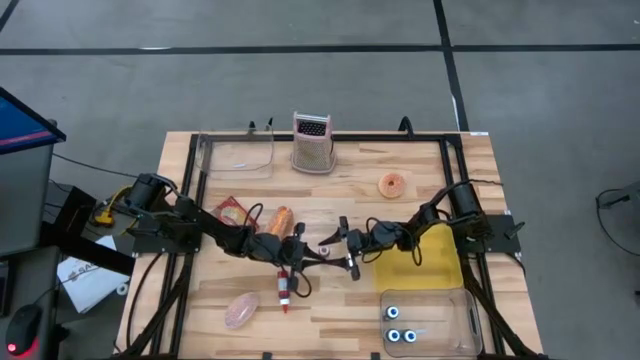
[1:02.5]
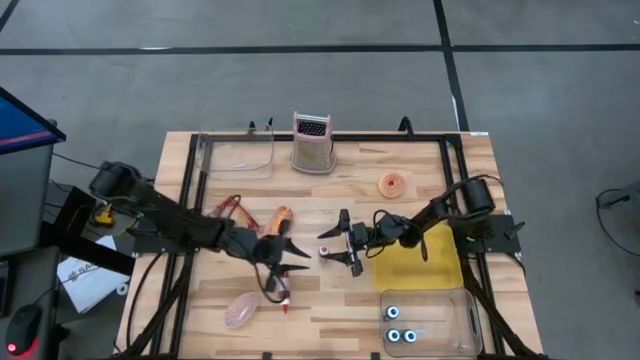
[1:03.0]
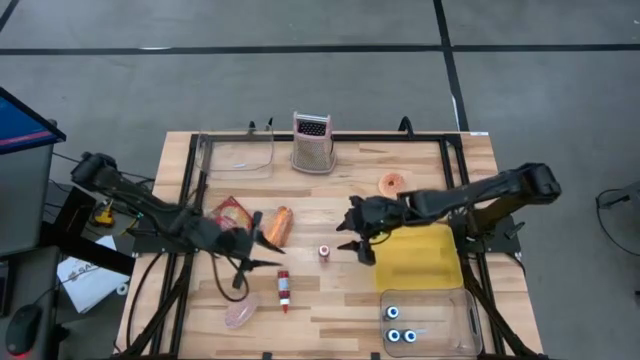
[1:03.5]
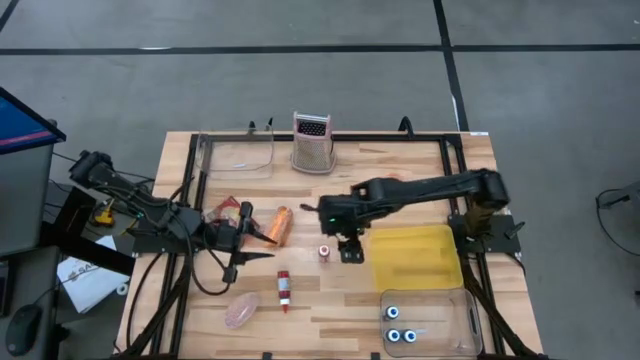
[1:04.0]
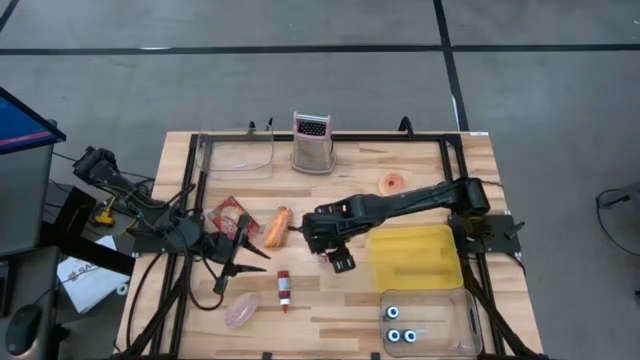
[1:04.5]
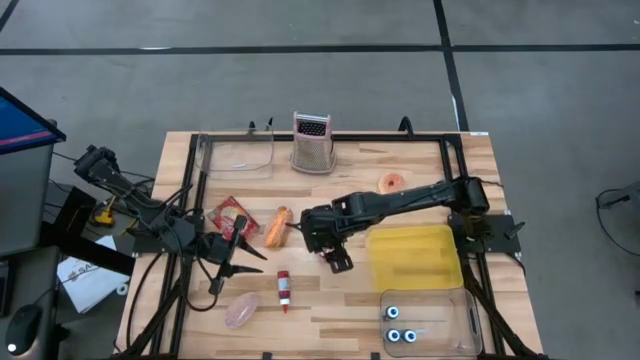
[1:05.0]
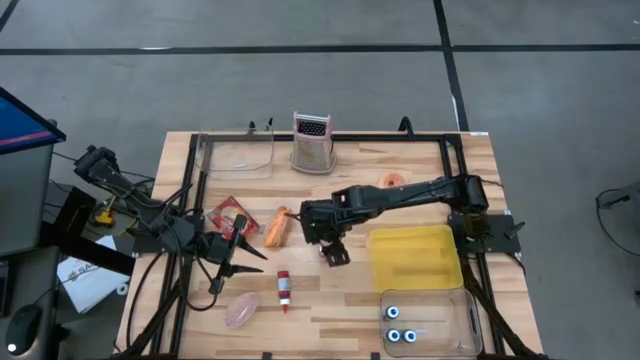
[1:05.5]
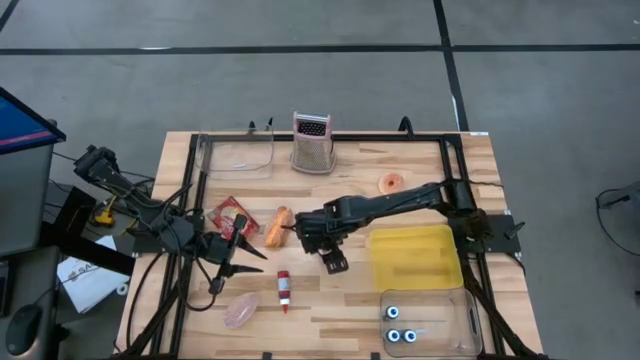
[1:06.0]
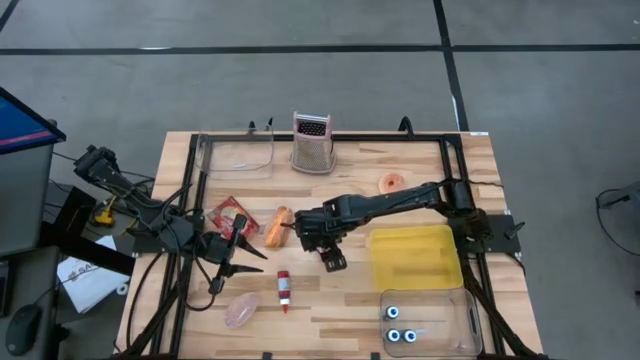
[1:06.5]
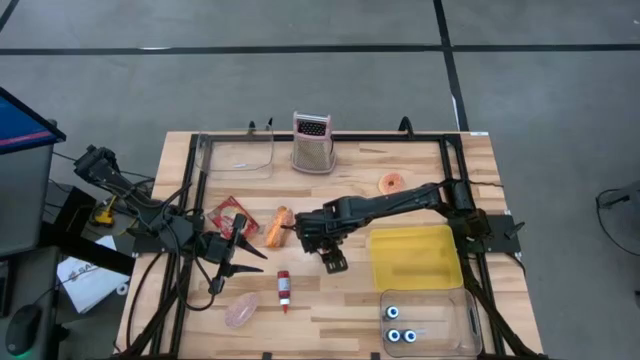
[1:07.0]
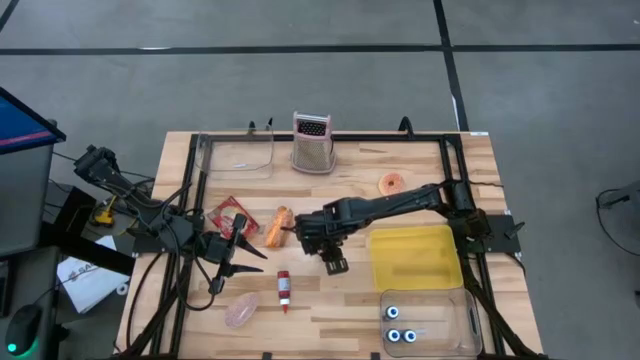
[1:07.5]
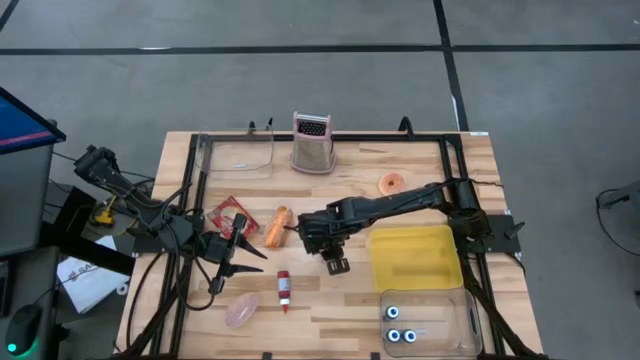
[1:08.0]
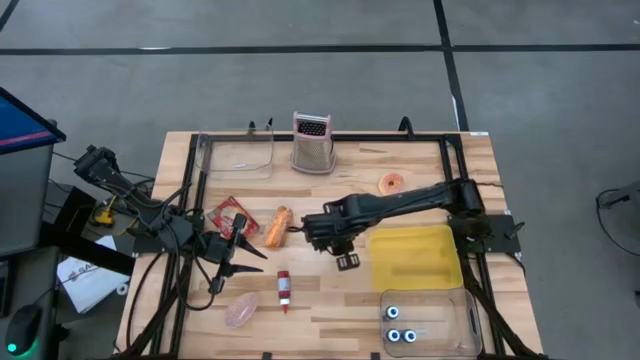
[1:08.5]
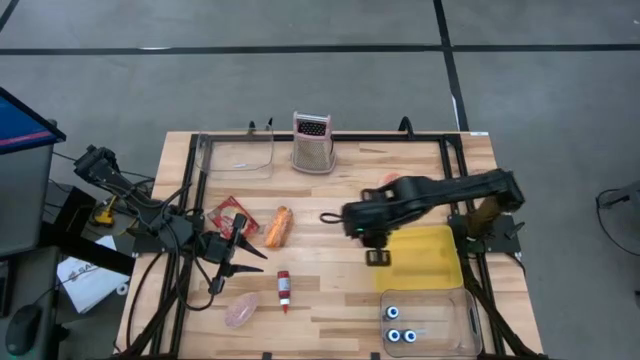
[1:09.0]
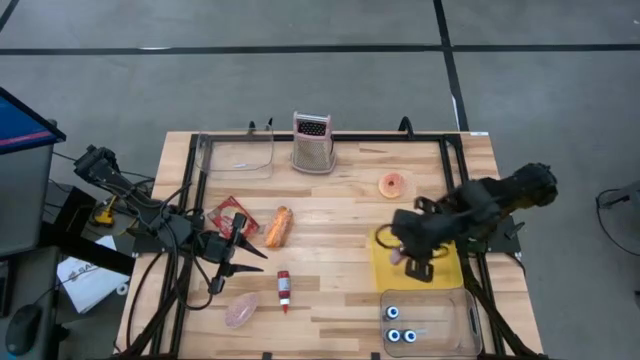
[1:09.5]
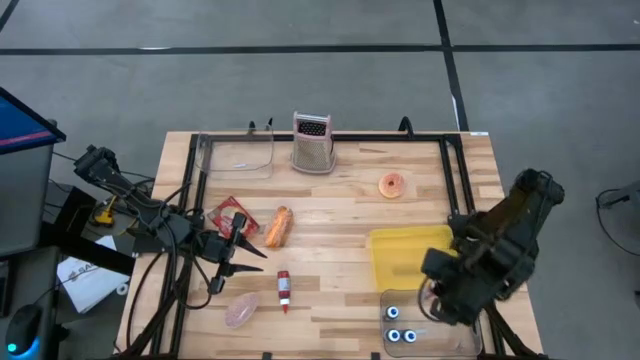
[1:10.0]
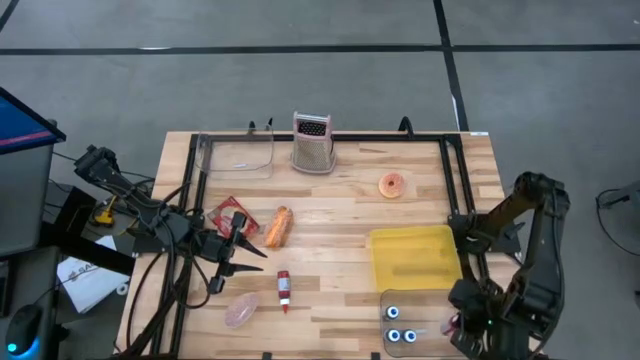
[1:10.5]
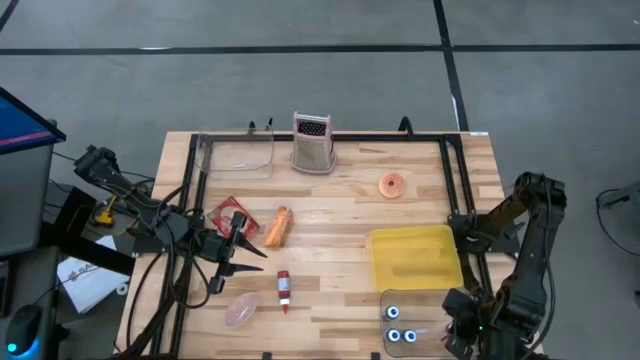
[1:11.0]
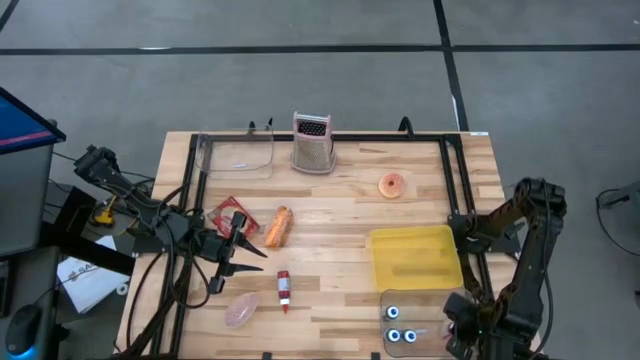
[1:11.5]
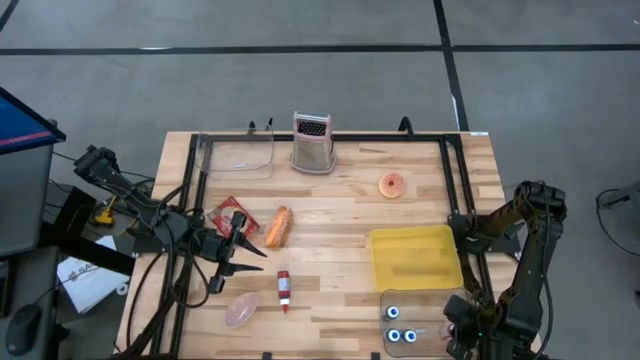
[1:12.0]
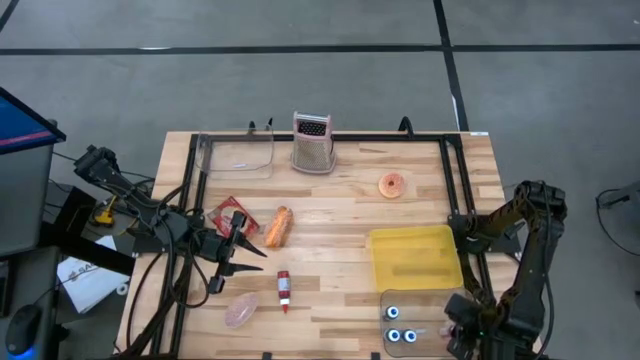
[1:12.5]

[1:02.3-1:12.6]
Task: Pick & Place Food Item
Put the orange food coloring bottle into the bottom transparent bin

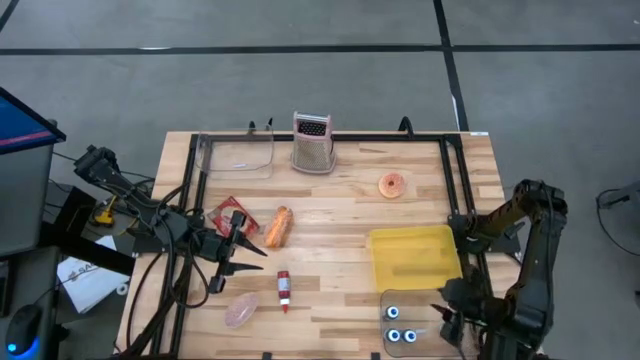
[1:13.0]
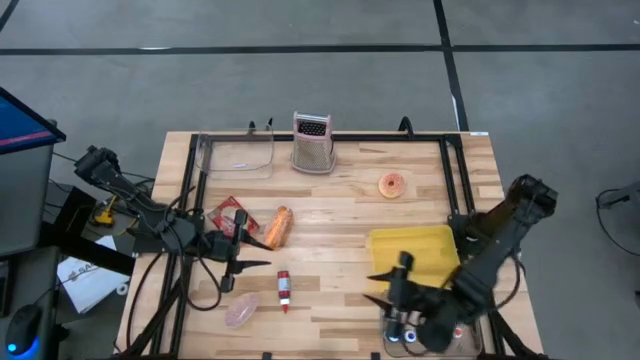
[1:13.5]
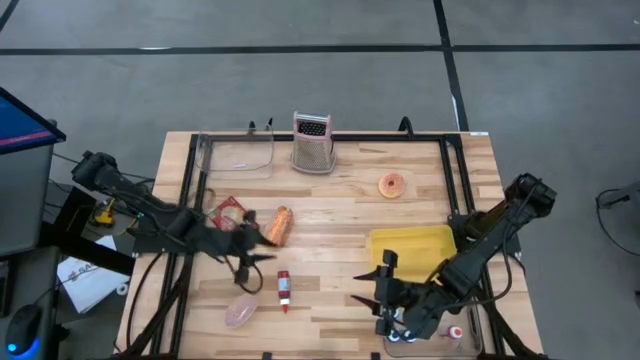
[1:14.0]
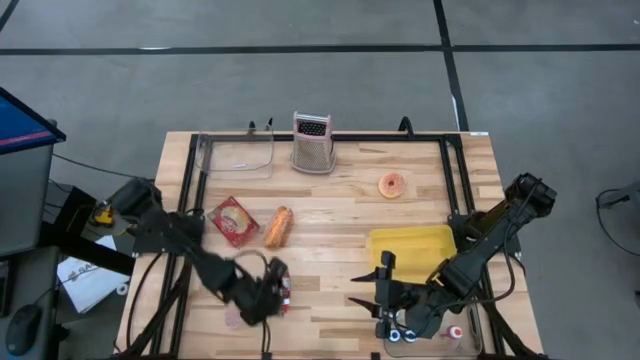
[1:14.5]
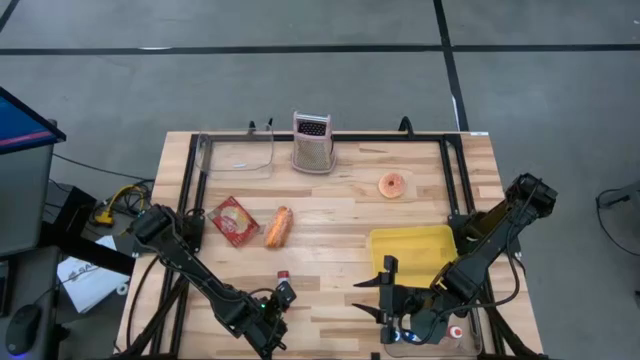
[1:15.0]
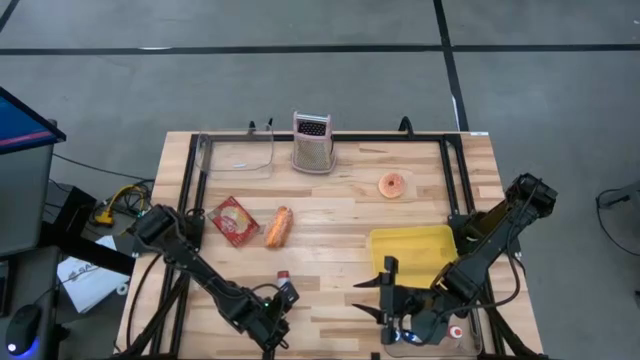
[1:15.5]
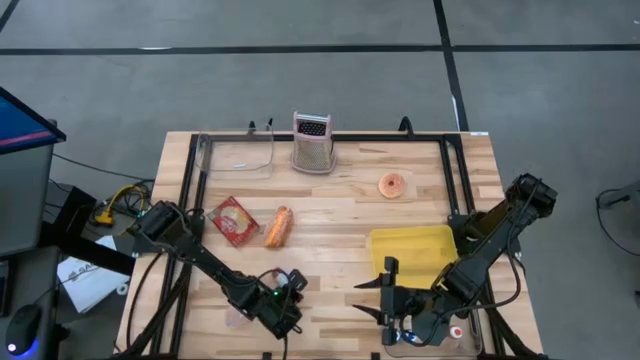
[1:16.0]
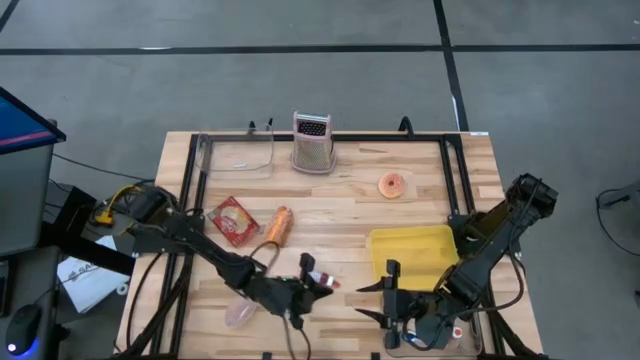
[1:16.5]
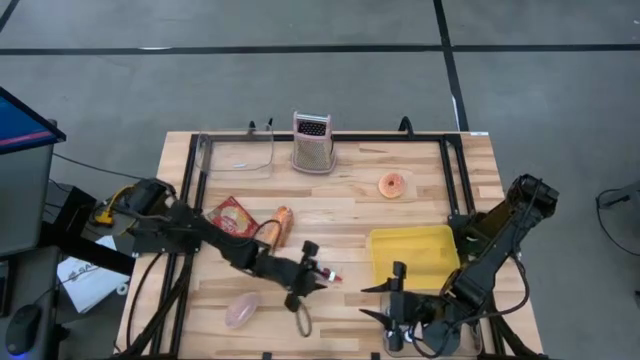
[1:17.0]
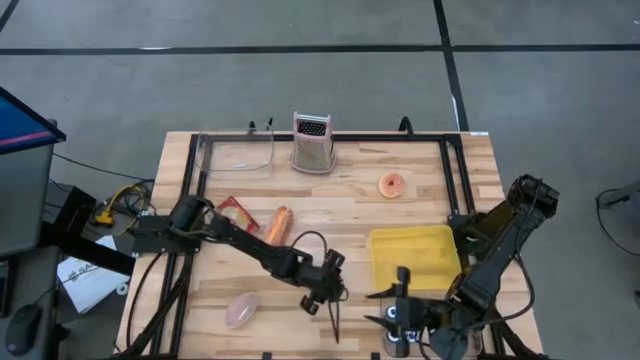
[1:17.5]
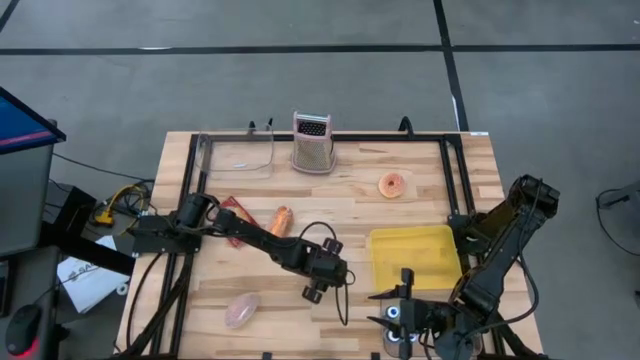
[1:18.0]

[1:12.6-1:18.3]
Put the red food coloring bottle into the bottom transparent bin
